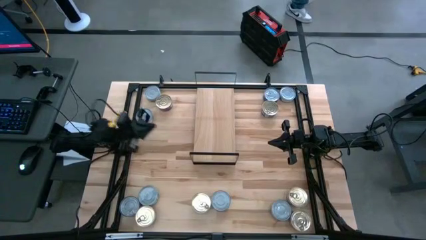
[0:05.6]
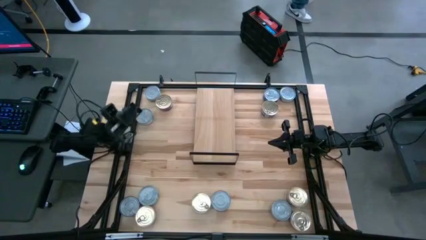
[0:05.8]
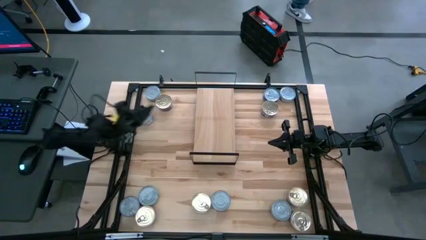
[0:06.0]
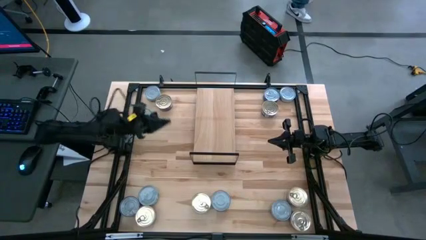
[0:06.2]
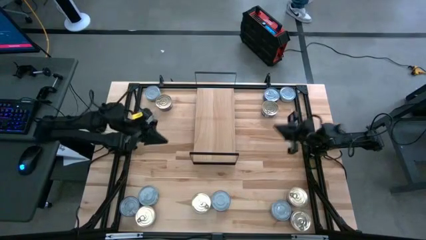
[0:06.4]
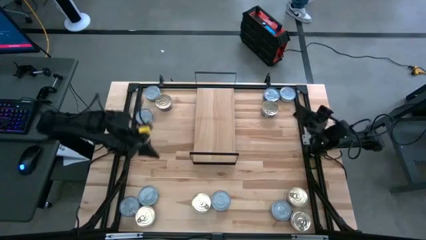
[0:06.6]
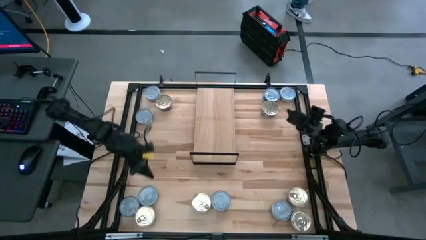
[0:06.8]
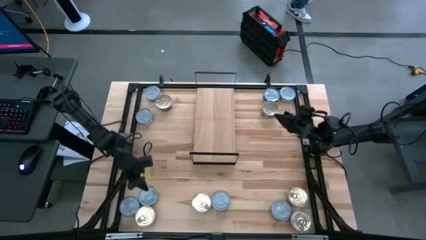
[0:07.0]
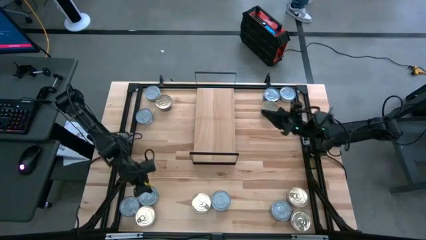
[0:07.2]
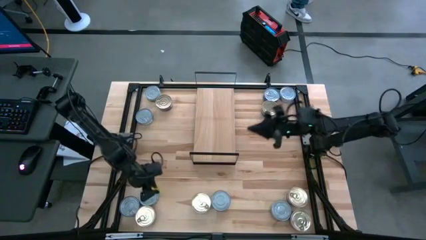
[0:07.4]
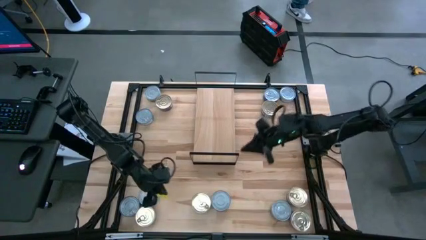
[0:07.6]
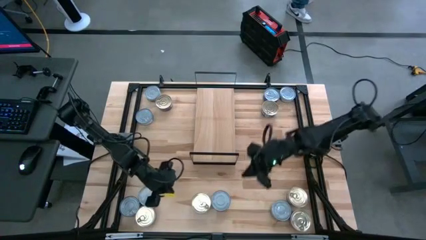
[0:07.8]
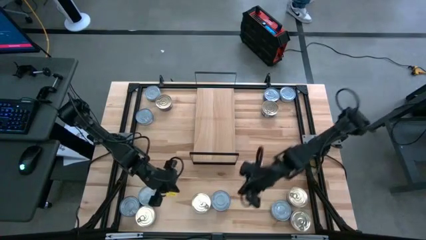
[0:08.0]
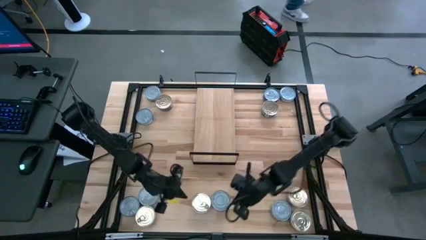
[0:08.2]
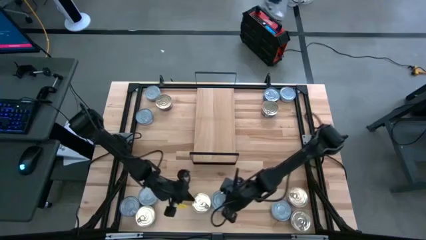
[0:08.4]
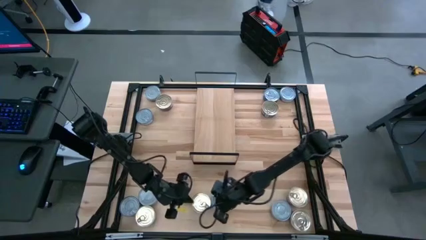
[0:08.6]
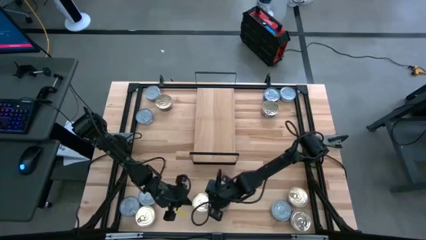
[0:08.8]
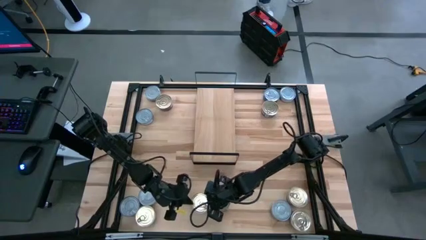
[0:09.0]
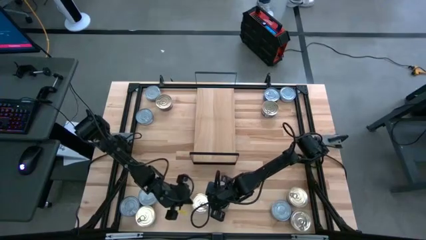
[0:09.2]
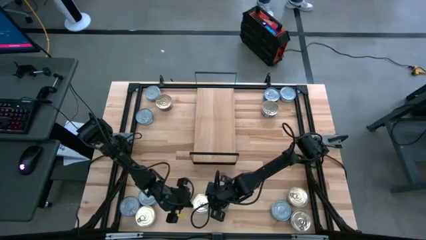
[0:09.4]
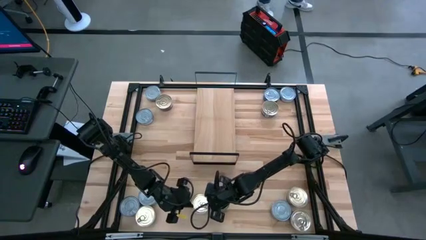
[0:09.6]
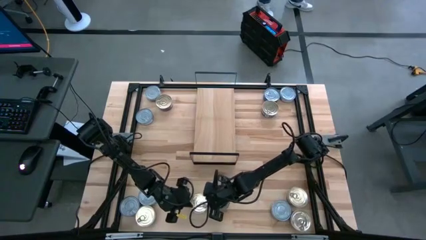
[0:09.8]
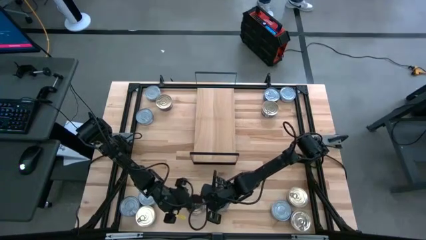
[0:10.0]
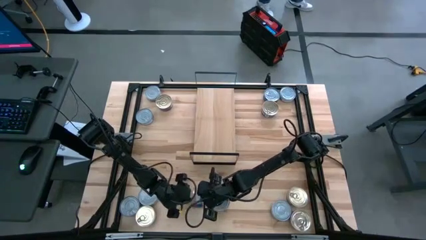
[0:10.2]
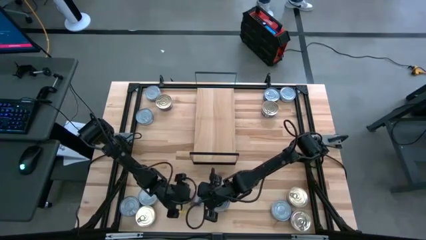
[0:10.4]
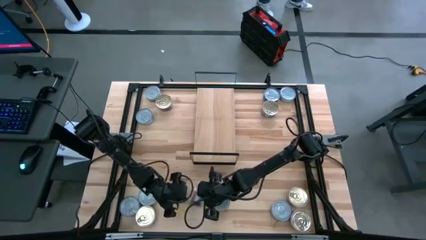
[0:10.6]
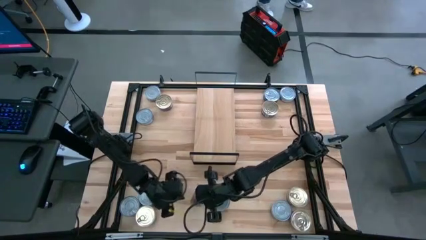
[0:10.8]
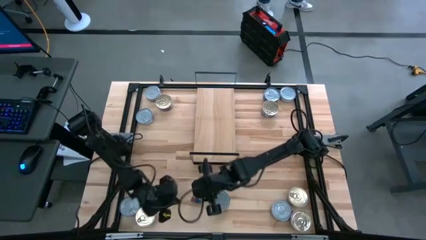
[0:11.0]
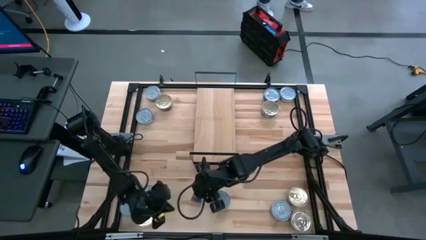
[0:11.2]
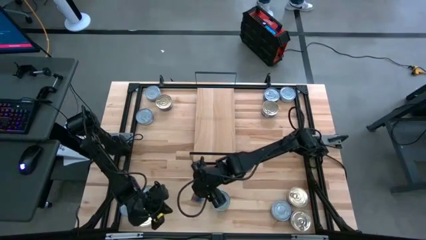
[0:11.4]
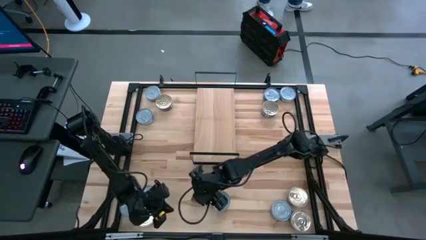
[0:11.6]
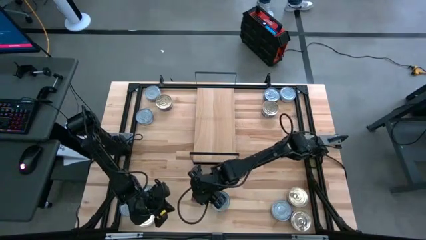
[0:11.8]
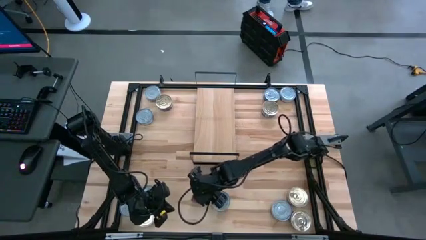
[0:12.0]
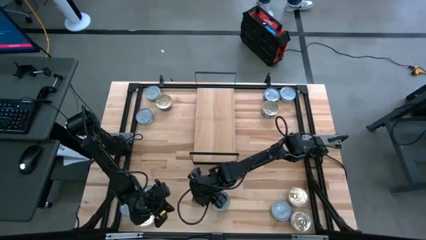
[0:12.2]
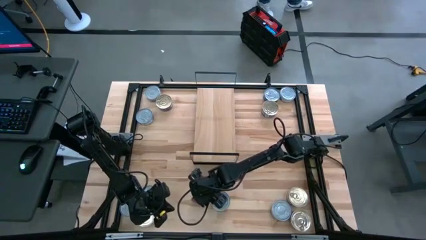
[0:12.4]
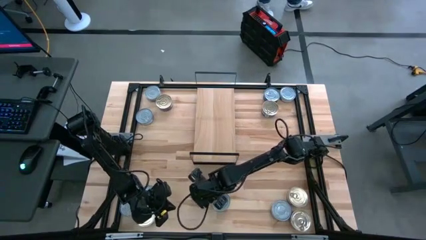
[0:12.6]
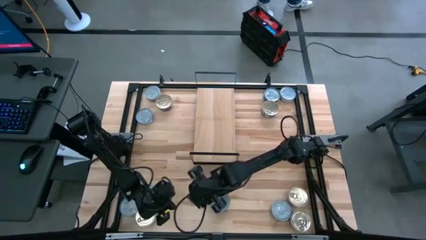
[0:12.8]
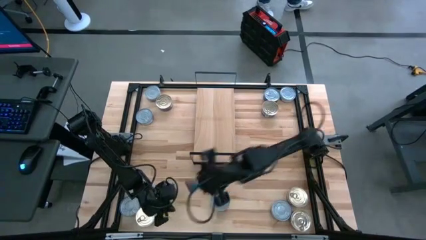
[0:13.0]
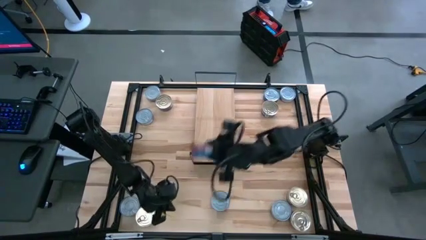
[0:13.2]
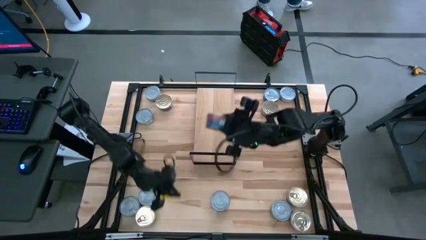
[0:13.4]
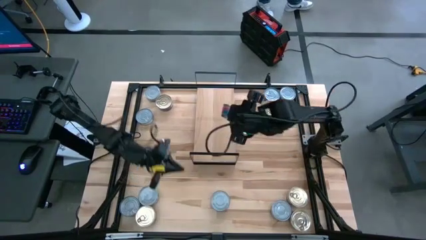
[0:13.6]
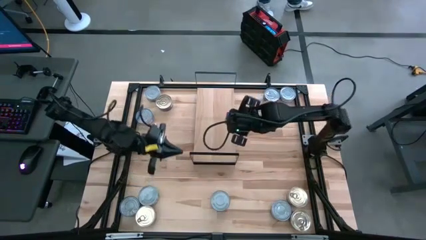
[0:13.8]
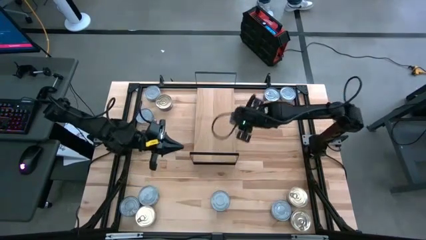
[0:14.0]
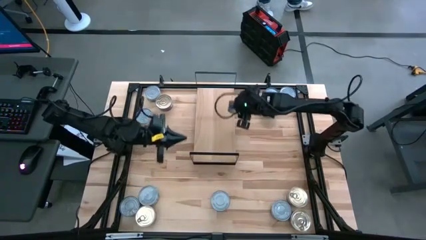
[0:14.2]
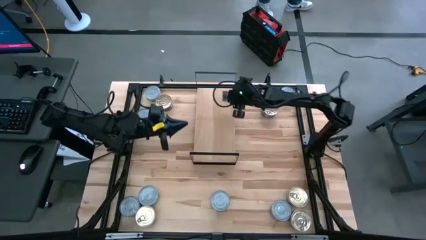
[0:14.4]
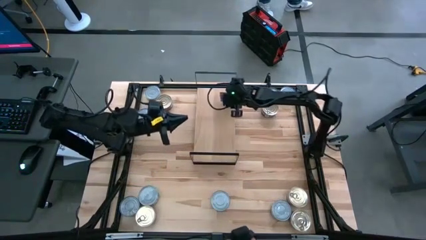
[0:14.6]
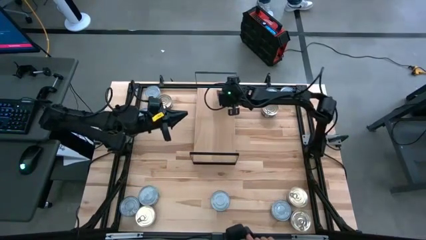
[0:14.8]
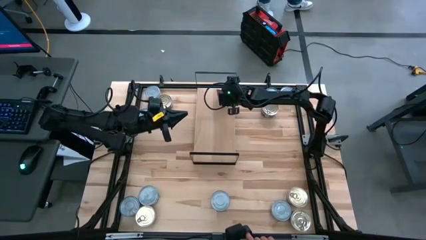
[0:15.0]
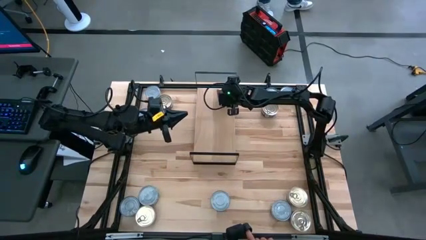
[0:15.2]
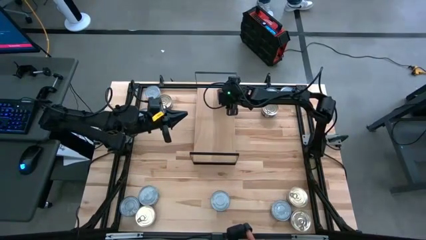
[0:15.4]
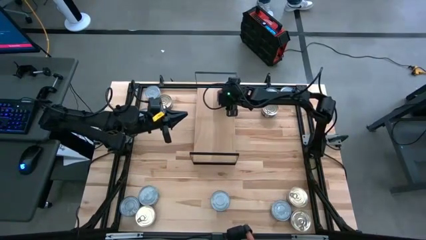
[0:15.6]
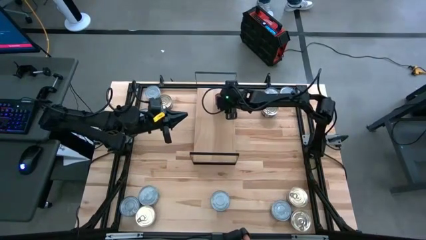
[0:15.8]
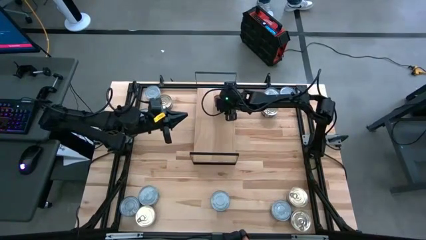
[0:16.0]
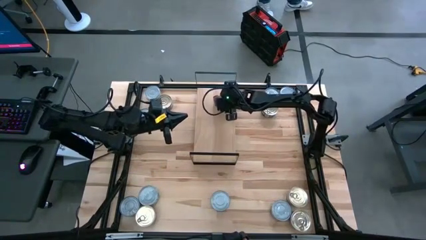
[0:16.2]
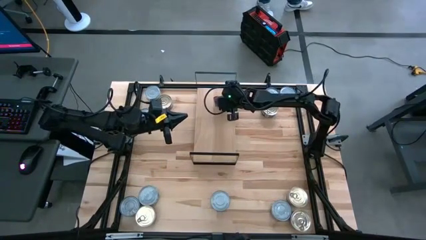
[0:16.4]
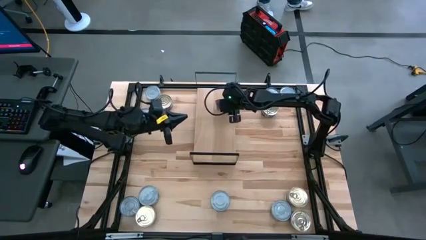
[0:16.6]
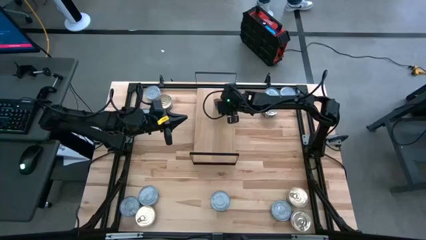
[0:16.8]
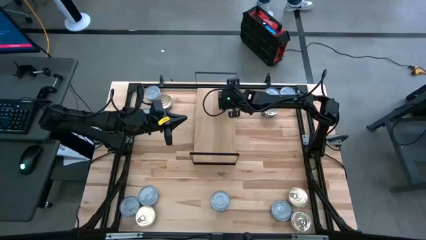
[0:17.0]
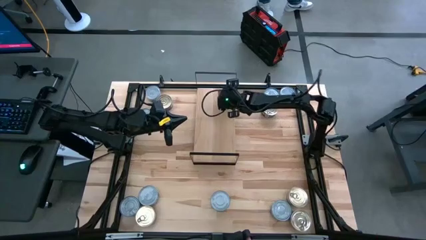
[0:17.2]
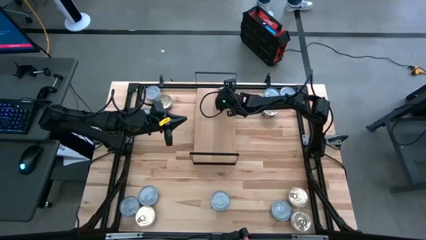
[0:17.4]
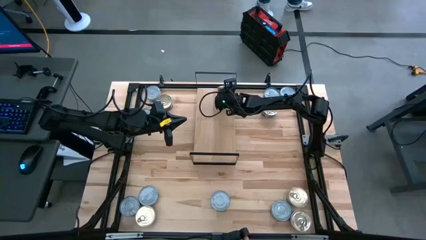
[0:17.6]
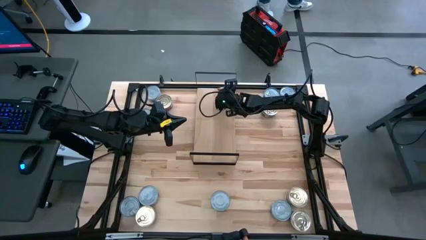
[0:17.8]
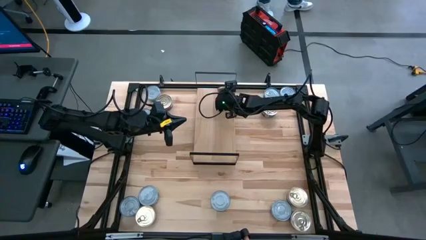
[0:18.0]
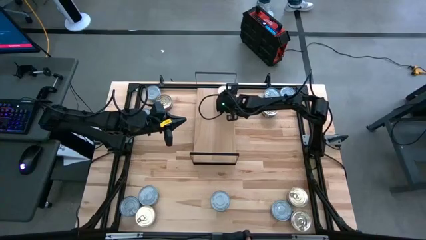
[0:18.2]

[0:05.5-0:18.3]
Task: Stack canned seafood by type on shelf
Put the blue pink tuna can on the shelf
